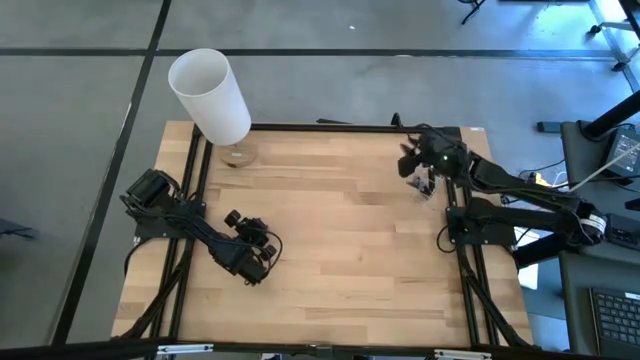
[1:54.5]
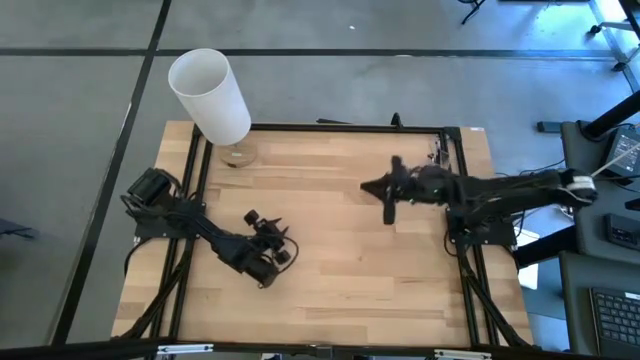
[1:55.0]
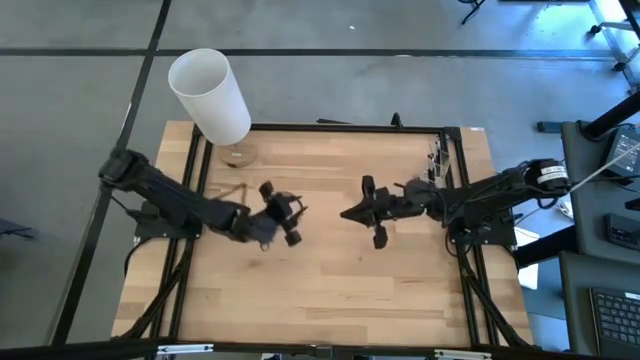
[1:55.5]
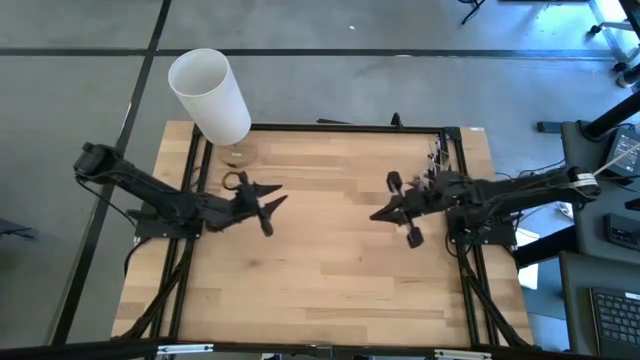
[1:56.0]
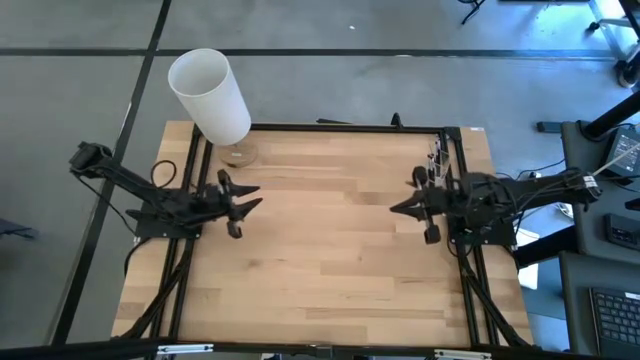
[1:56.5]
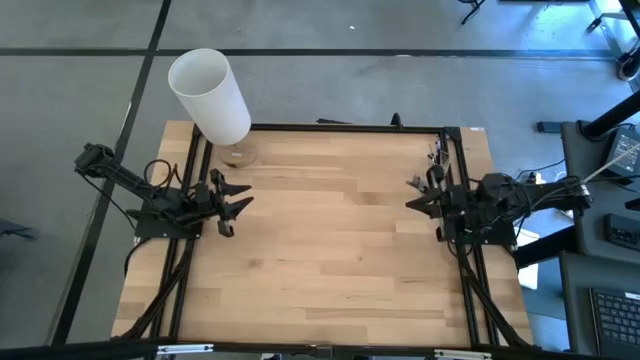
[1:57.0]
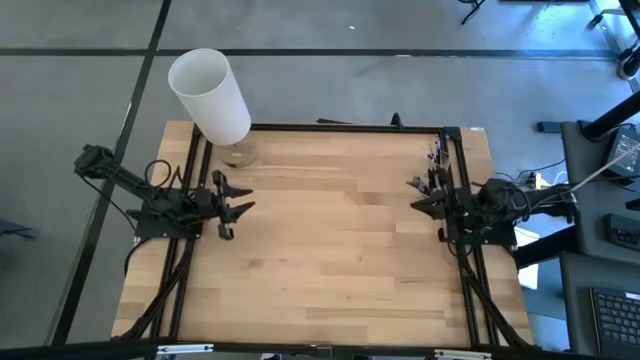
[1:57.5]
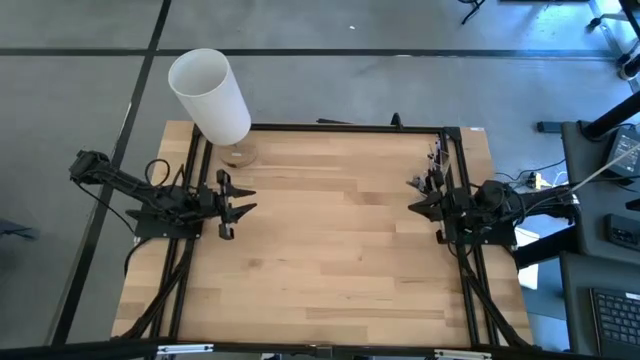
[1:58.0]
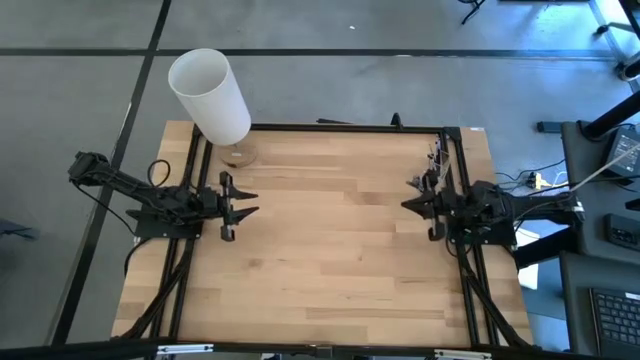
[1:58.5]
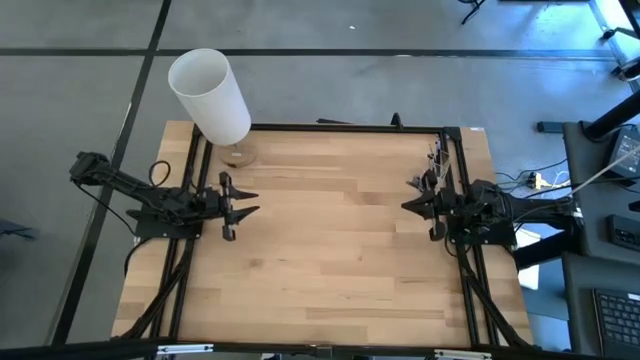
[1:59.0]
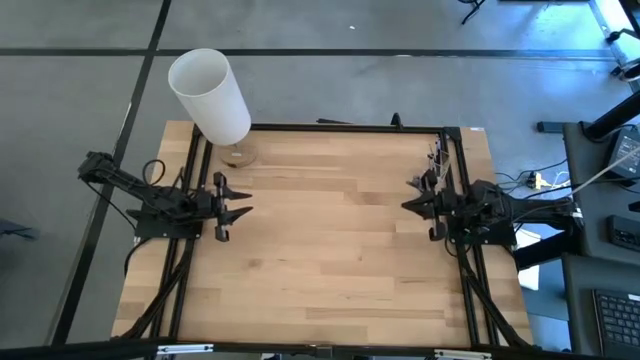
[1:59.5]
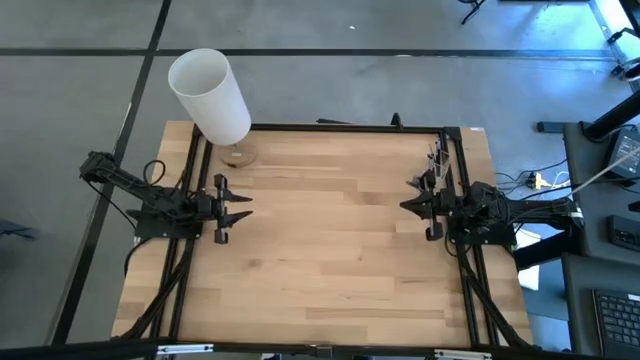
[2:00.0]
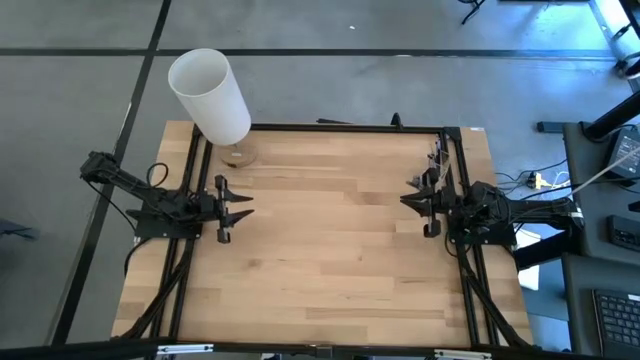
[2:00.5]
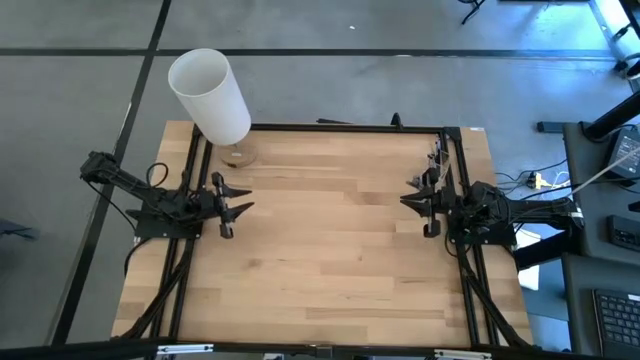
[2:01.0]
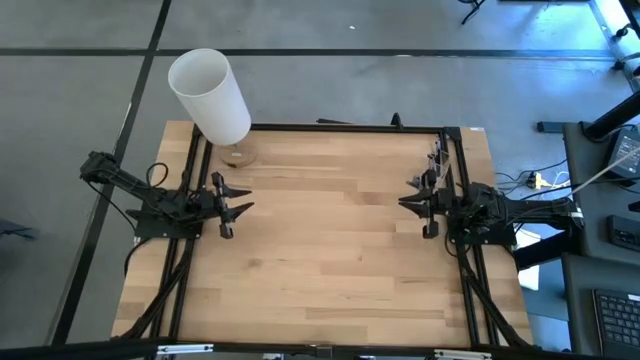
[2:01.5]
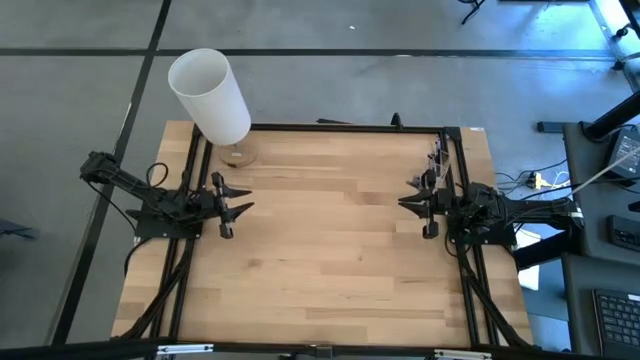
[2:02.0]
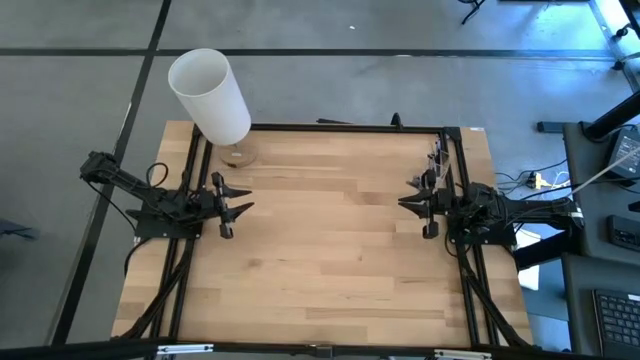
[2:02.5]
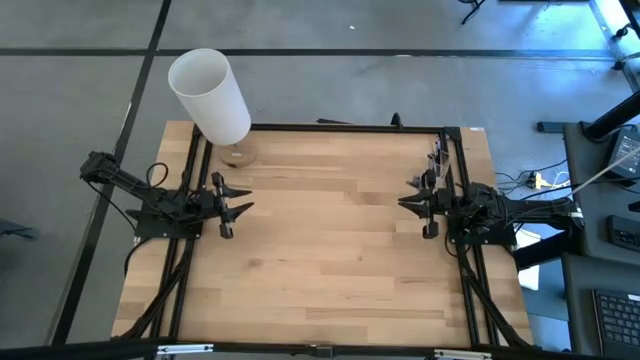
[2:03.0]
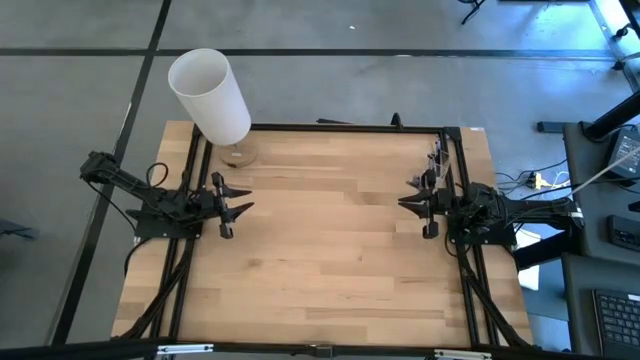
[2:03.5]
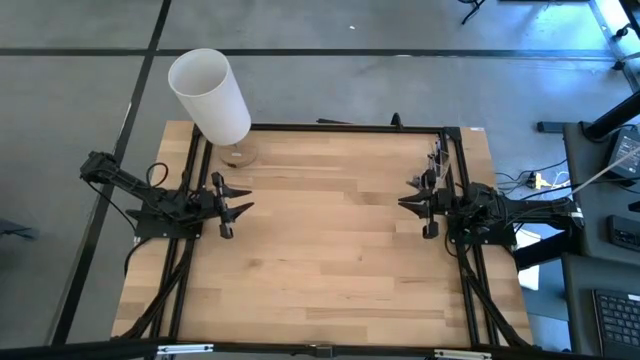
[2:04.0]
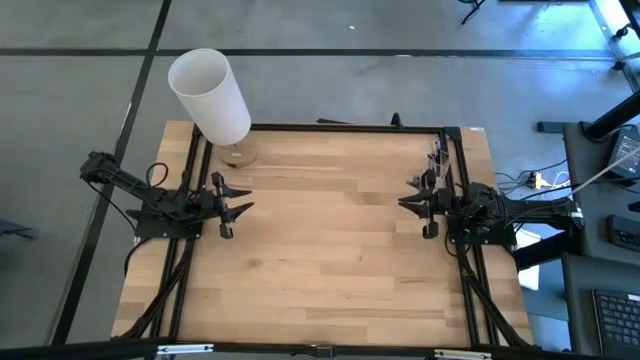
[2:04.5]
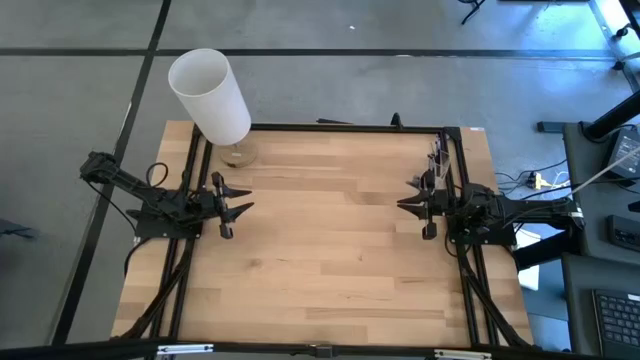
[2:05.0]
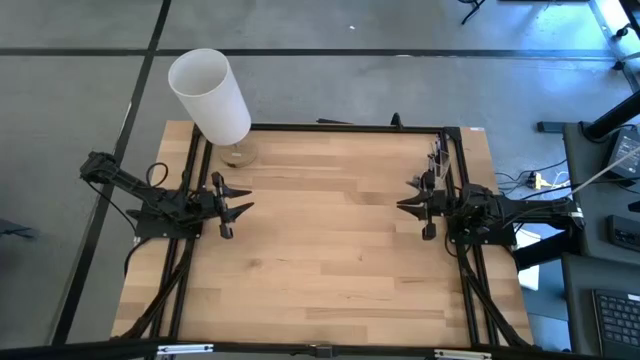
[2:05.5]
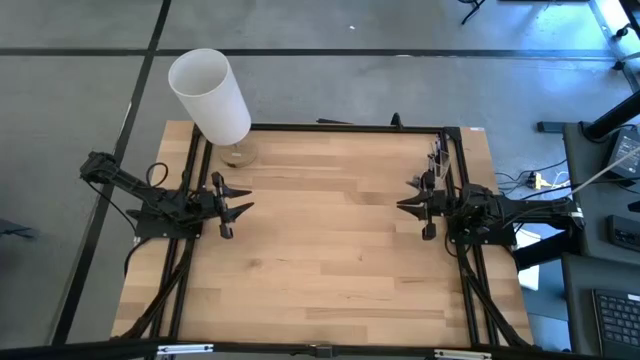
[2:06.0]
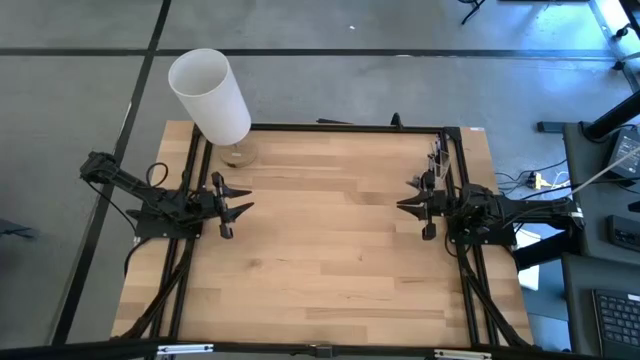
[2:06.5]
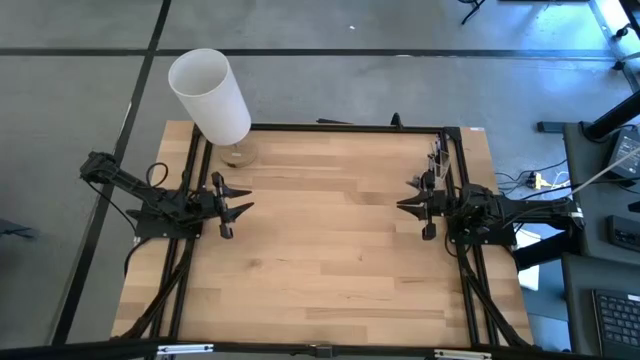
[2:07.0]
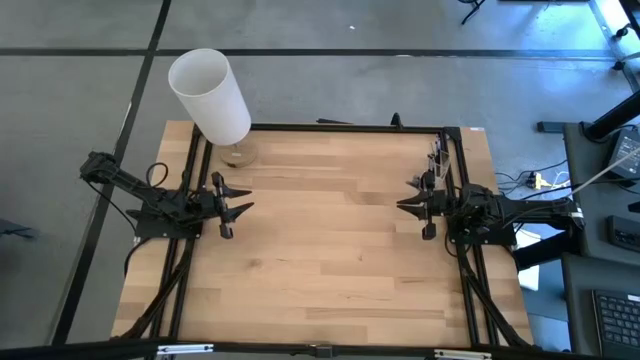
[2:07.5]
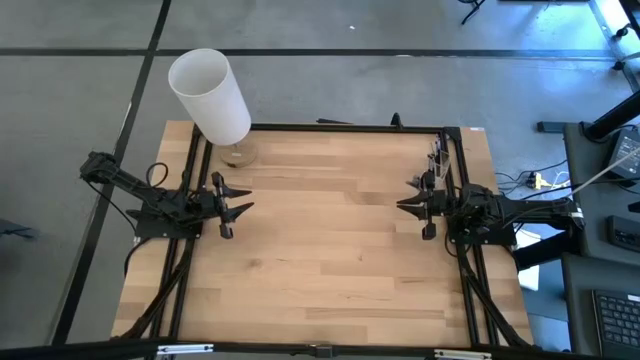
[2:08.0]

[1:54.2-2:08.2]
Task: Sort items
Return to Home Position

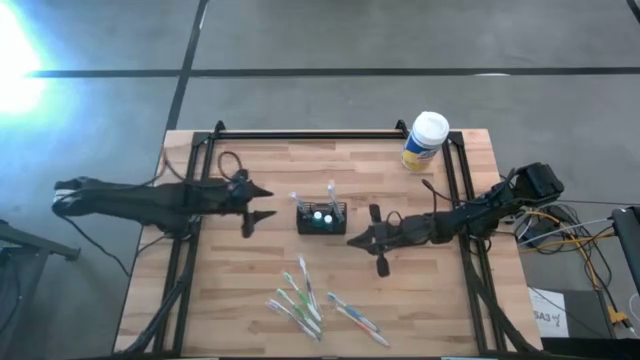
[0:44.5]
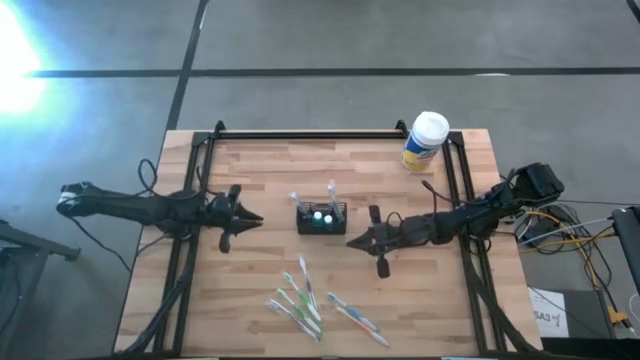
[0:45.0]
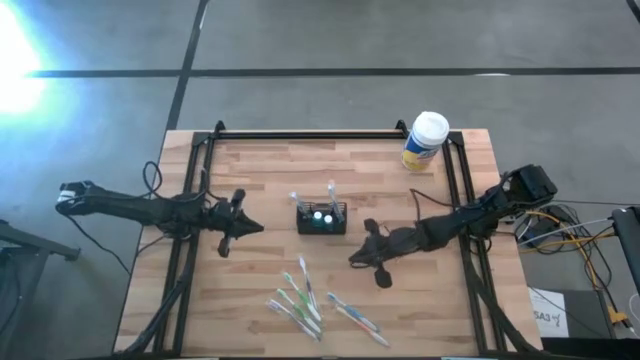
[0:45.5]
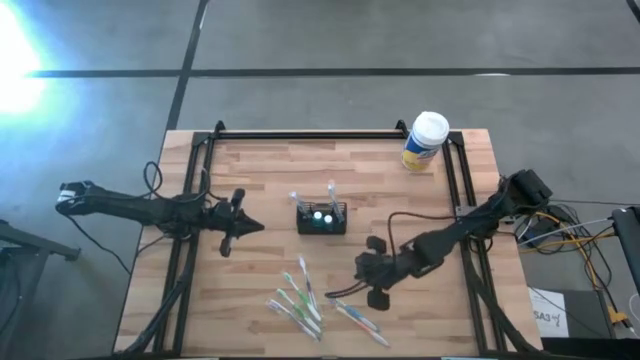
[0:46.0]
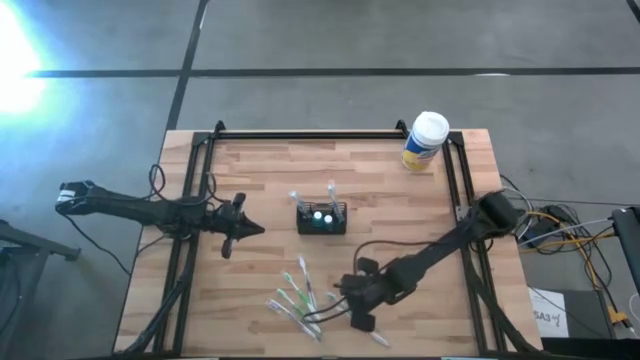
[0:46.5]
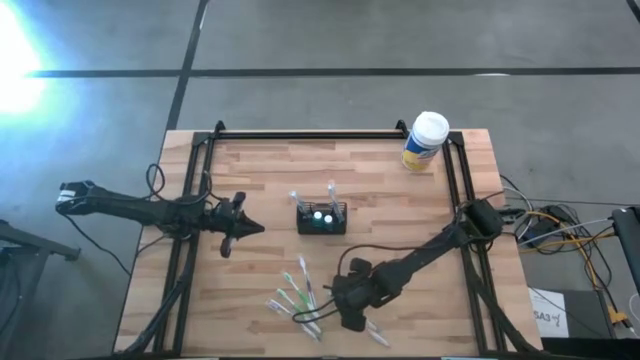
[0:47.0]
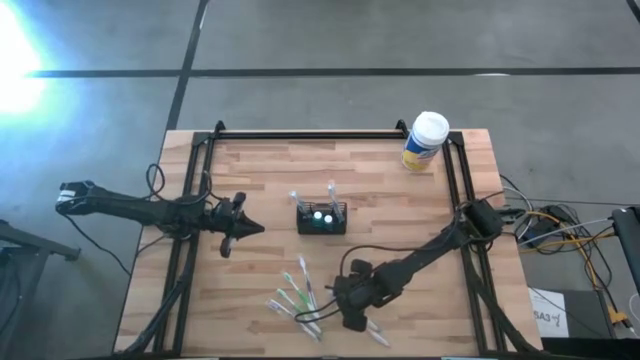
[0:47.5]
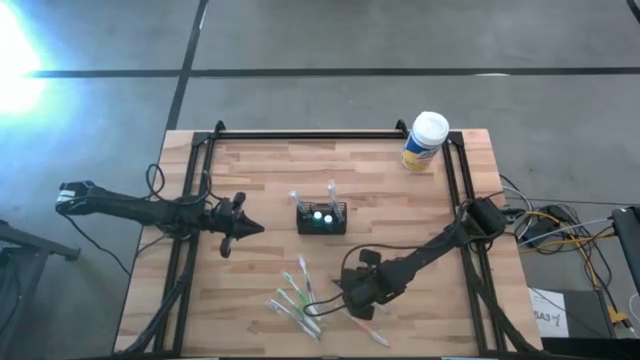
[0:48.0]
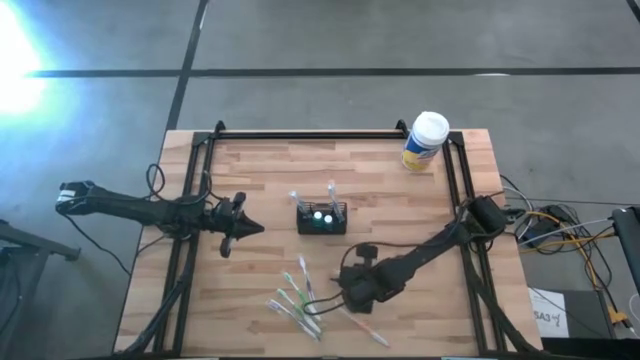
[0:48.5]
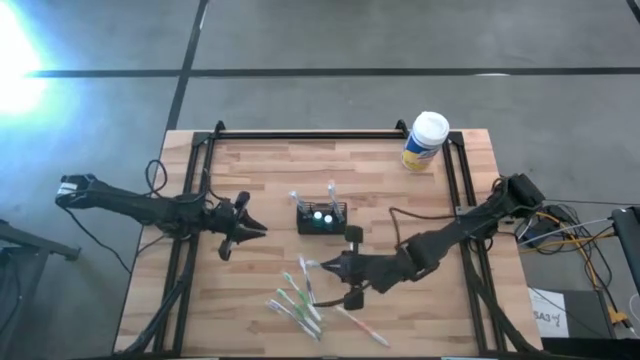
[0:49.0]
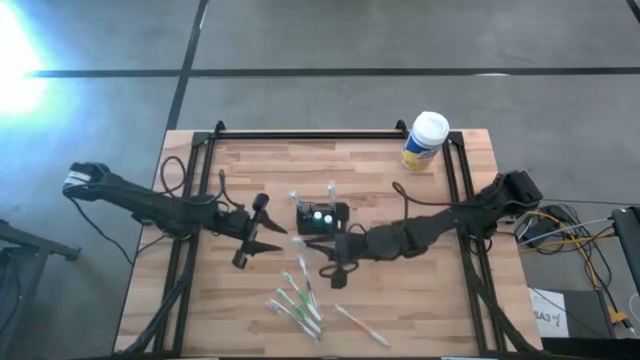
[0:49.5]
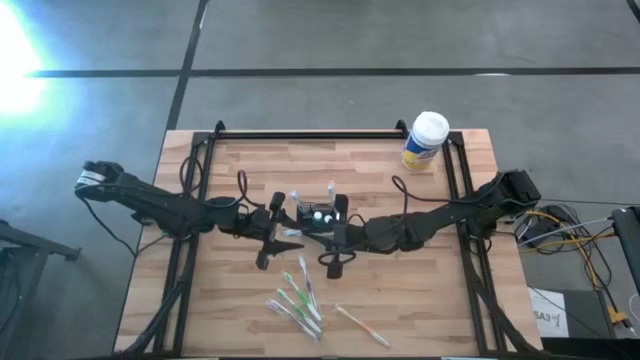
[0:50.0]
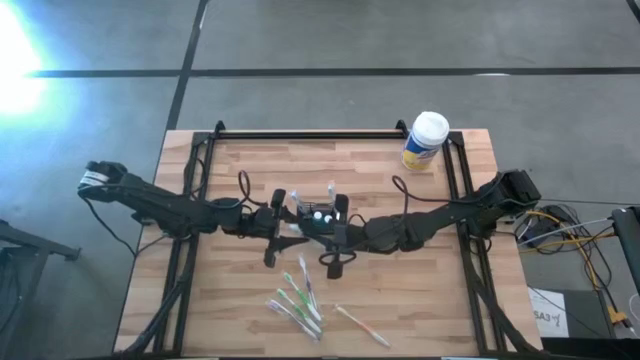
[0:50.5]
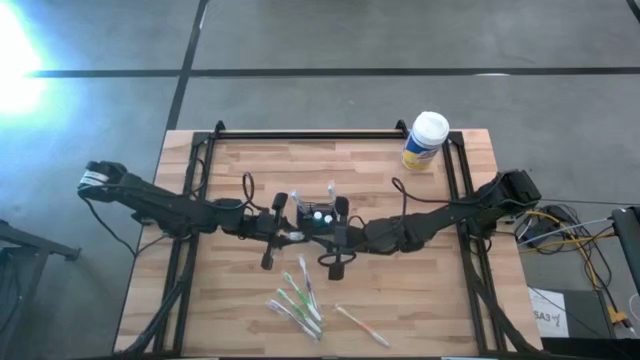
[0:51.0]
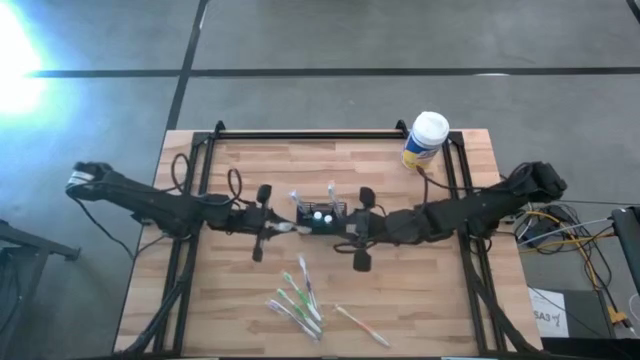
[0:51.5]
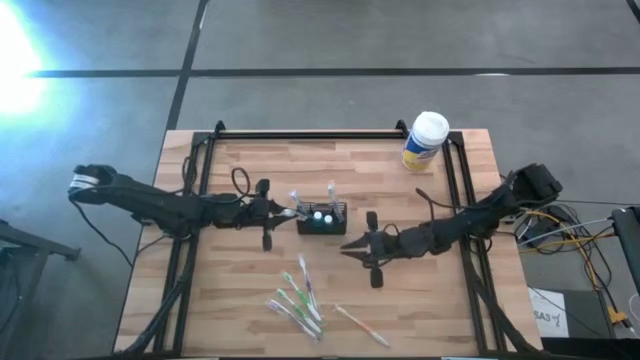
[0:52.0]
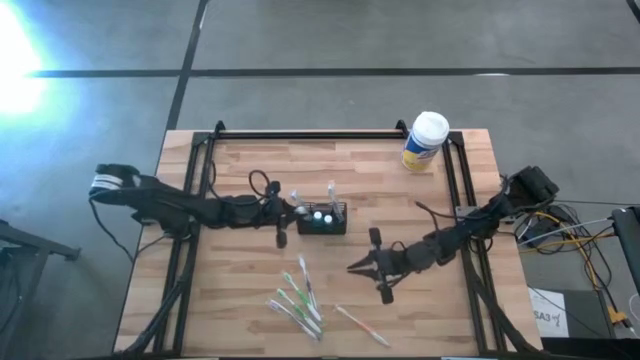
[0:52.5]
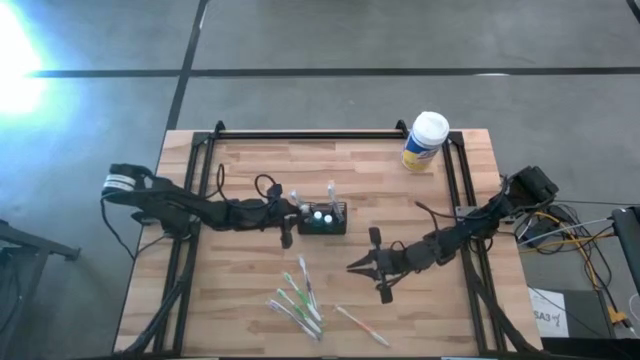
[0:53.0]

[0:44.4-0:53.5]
Task: Pick & Place toothbrushing station
Put the blue toothbrush into the black mesh organizer
